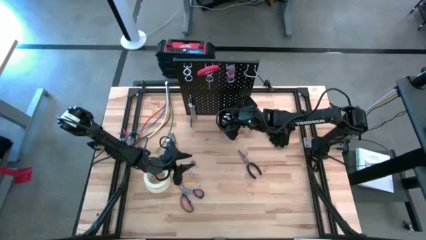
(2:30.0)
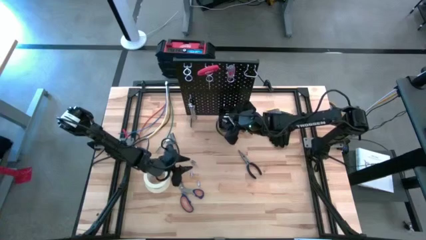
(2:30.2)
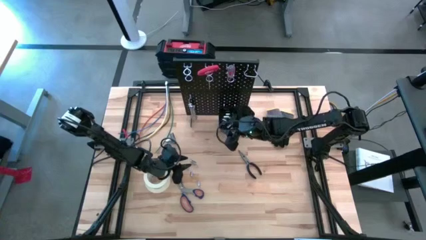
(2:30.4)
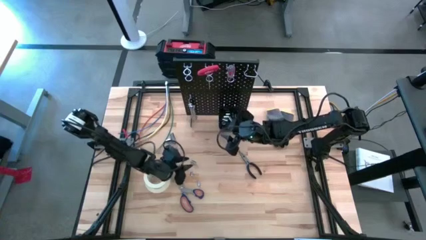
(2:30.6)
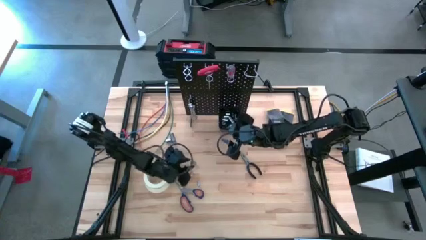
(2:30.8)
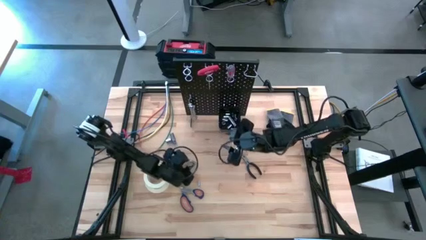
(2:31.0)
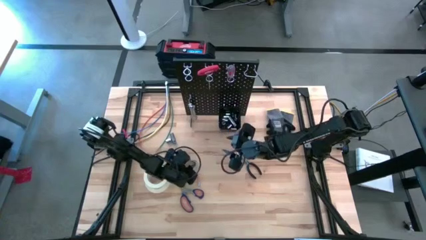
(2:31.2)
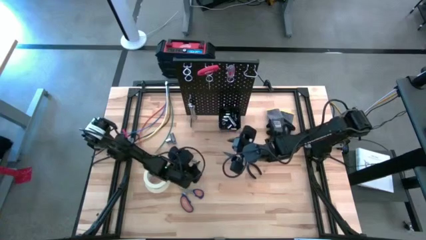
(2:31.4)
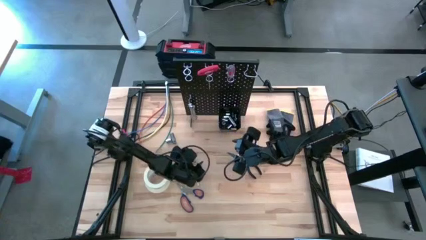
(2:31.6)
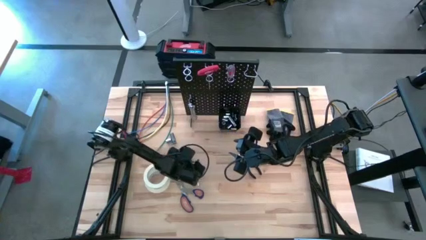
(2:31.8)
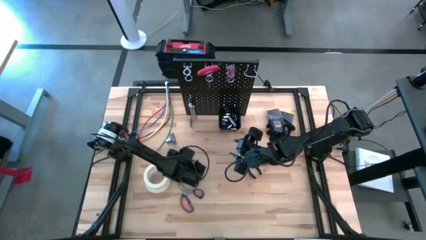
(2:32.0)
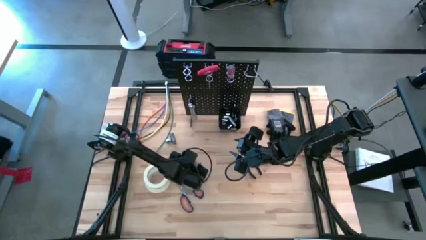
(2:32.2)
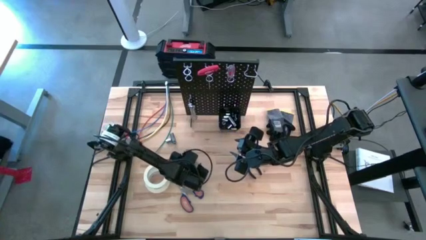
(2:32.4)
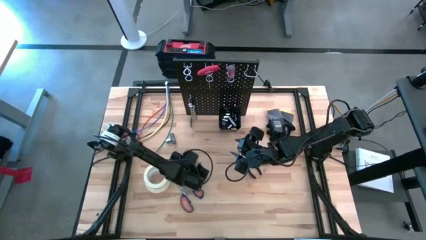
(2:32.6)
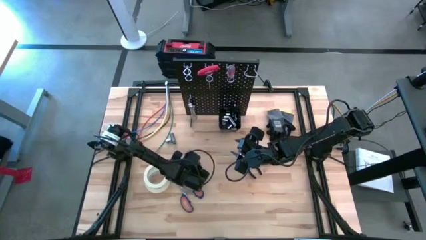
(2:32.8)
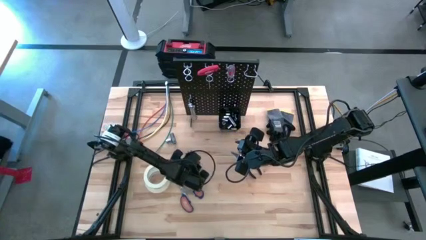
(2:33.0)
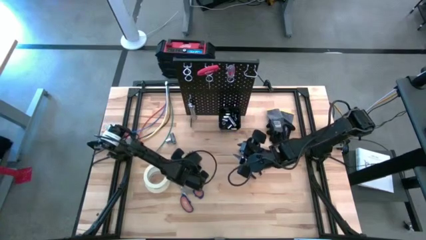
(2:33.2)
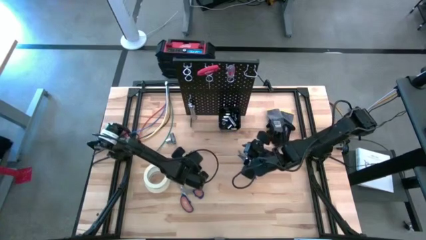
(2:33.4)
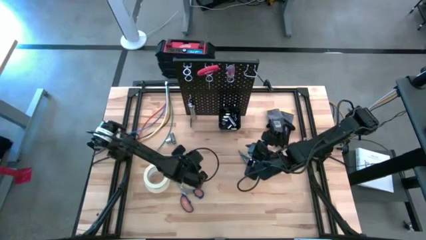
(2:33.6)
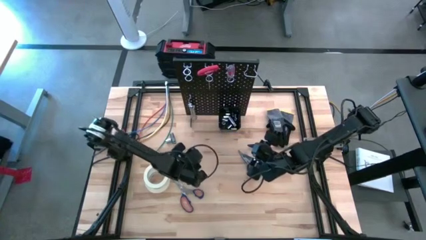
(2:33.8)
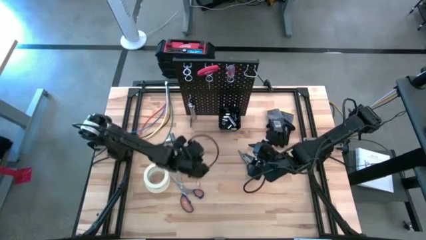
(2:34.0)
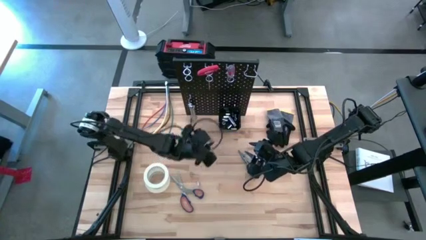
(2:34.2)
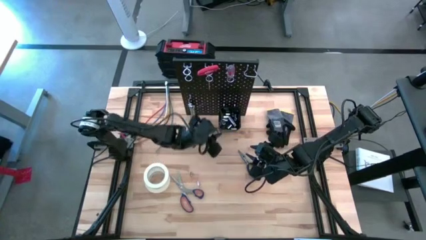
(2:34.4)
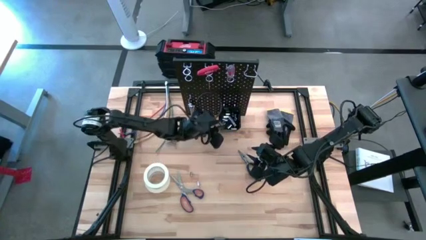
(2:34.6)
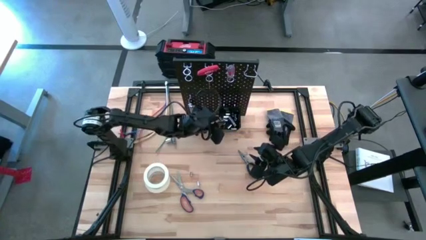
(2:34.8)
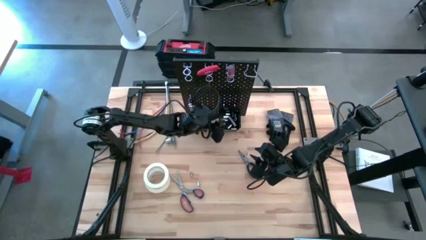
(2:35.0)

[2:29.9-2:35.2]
Task: Hang tools onto peg board
Put the socket into the black bin on the peg board

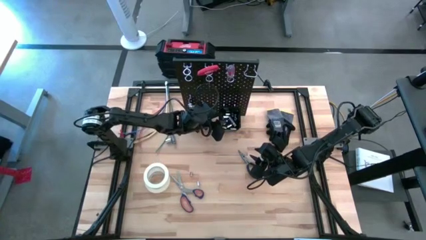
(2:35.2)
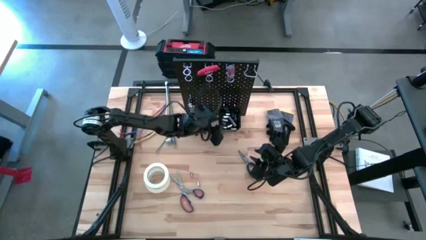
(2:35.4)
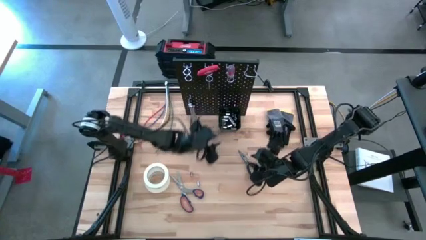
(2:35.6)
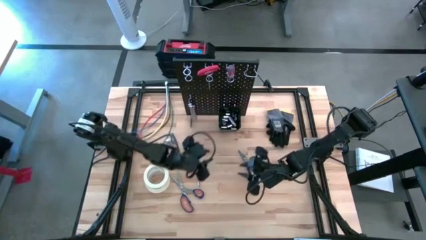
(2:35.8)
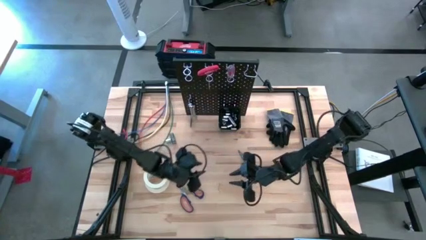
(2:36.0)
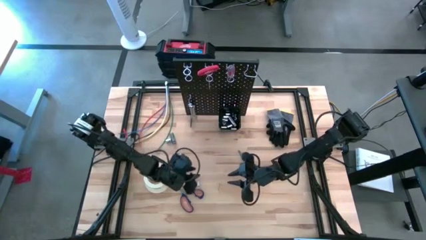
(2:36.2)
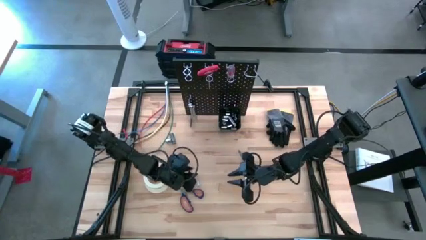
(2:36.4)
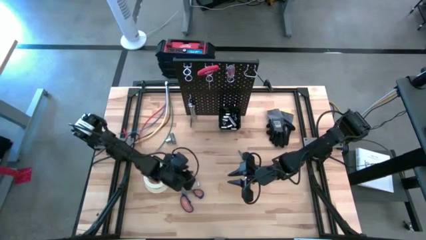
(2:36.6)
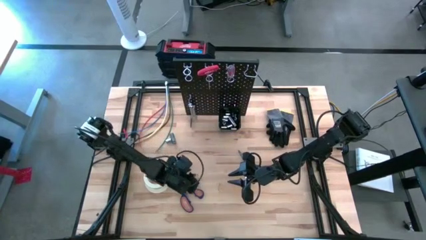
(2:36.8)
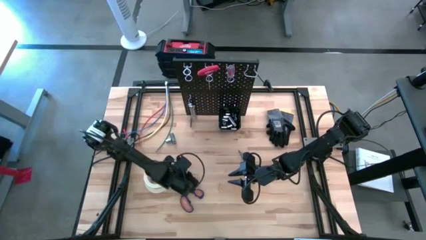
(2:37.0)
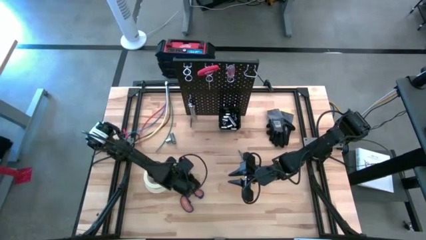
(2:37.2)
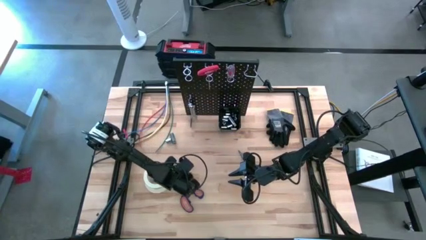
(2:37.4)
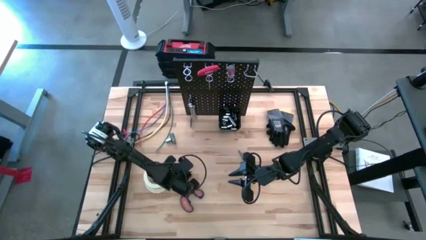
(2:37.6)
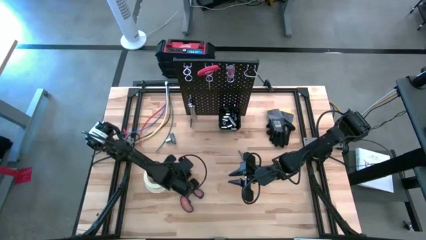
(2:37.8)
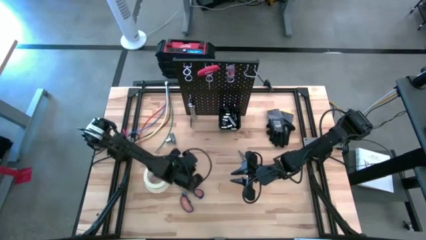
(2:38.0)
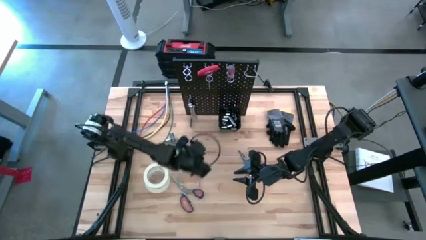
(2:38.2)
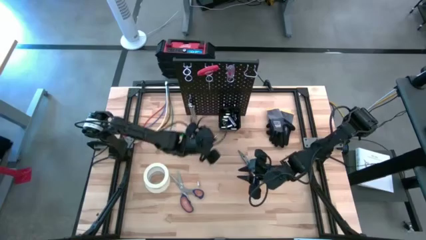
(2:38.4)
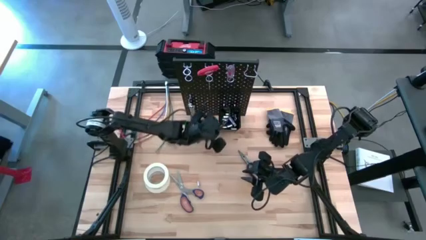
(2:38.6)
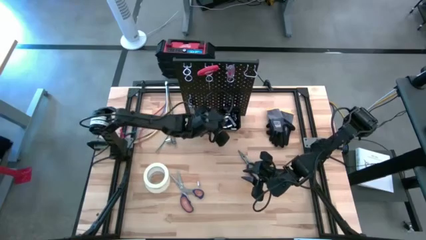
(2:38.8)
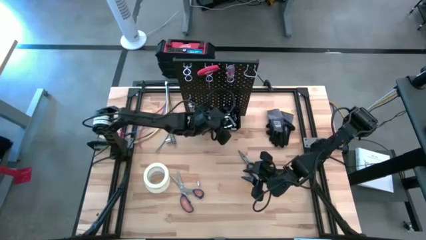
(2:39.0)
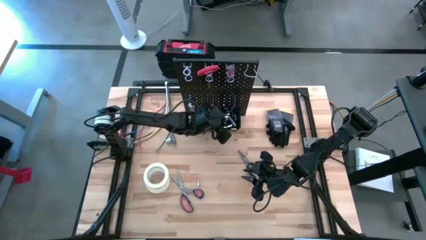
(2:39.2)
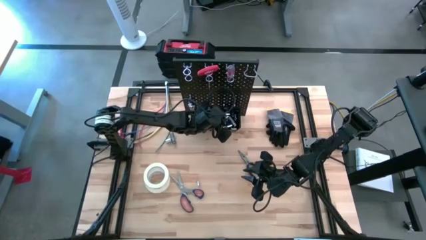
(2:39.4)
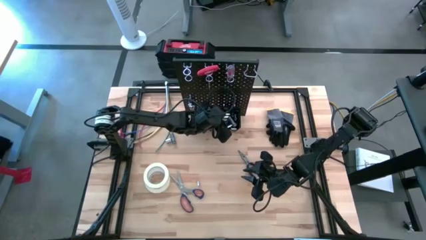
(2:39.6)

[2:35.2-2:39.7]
Put the socket into the black bin on the peg board

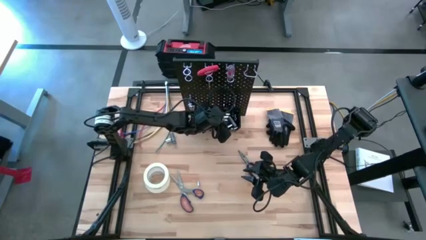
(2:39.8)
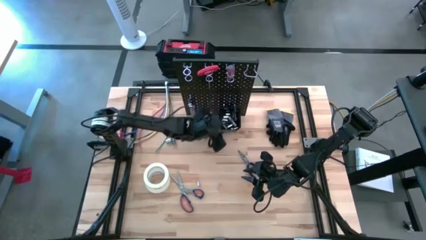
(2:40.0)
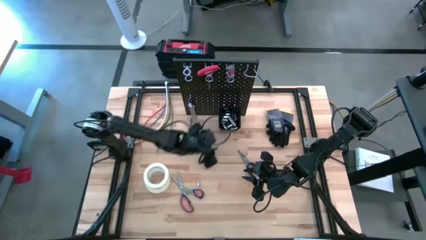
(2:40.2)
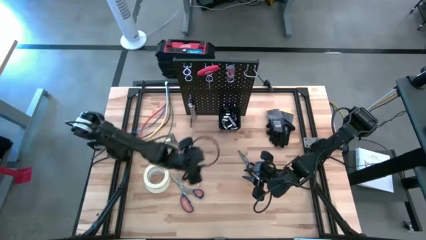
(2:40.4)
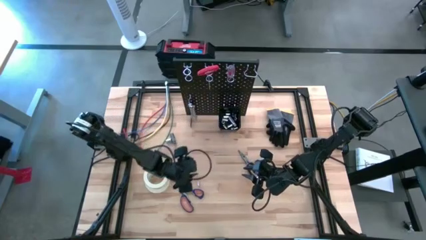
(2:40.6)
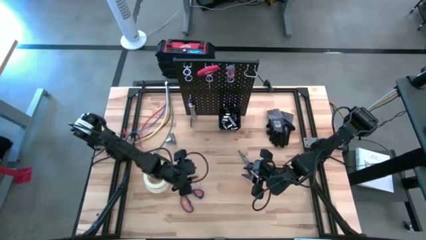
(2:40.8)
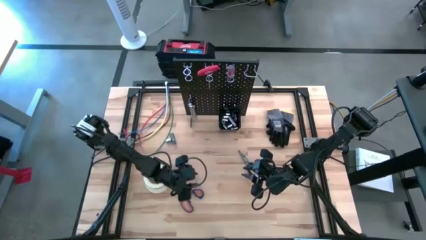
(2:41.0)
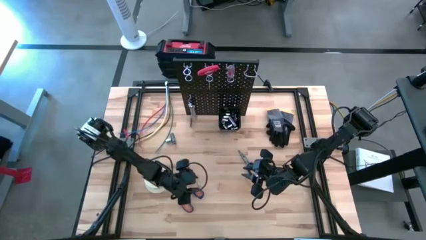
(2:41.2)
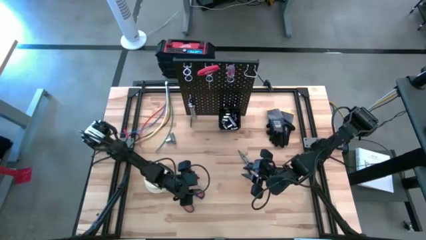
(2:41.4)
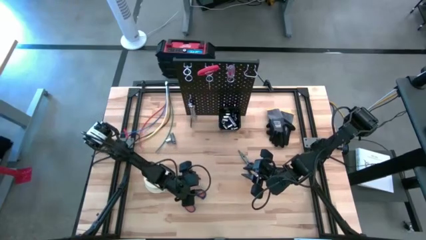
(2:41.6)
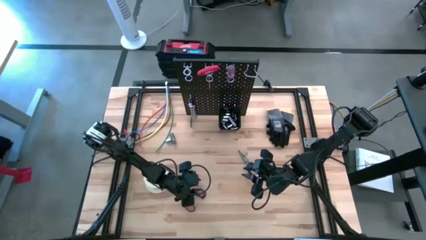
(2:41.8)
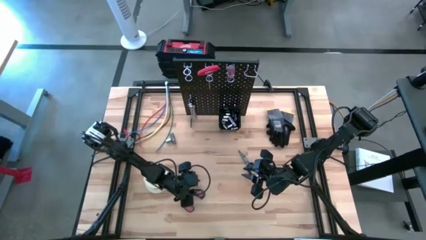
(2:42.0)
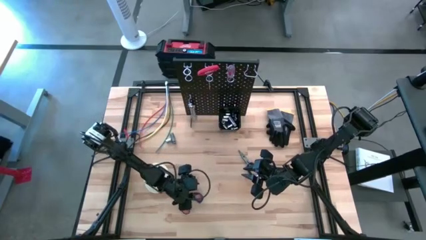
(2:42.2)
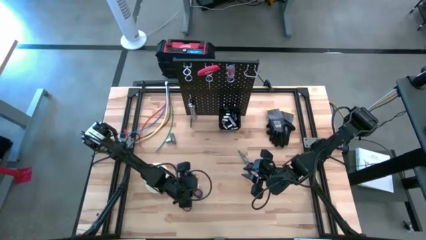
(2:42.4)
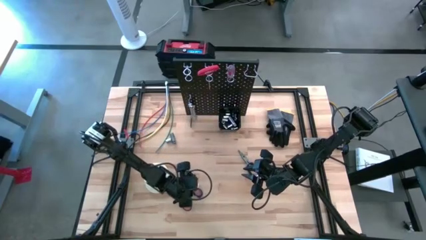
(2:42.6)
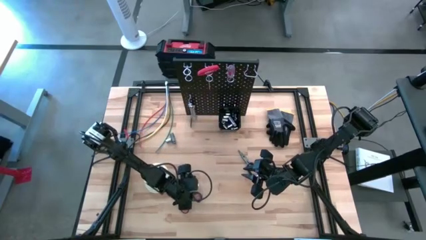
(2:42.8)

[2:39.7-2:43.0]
Put the socket into the black bin on the peg board

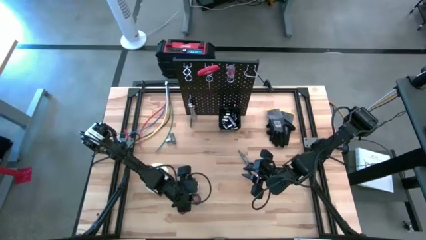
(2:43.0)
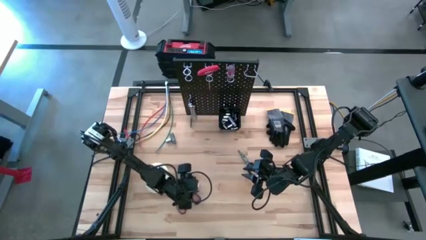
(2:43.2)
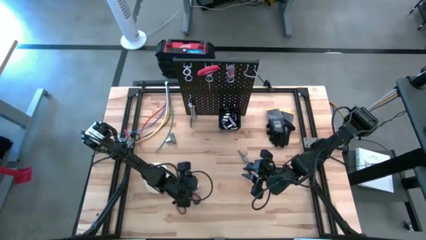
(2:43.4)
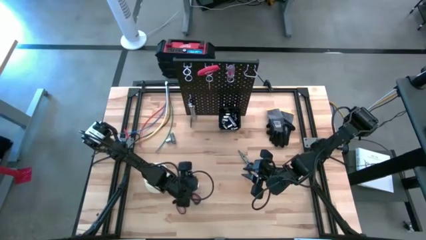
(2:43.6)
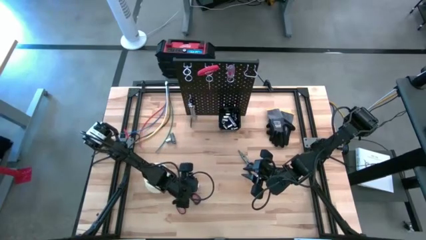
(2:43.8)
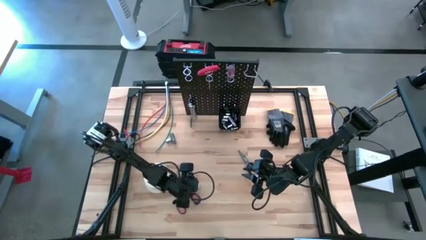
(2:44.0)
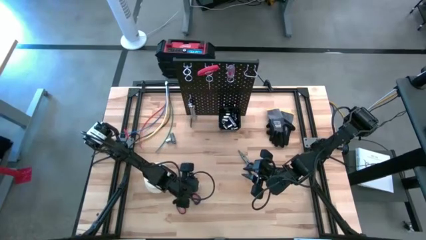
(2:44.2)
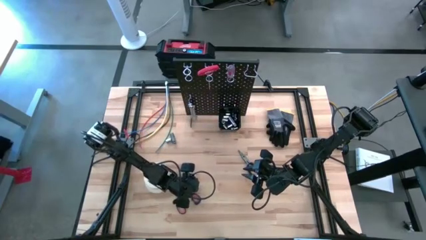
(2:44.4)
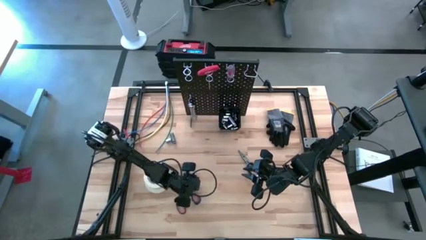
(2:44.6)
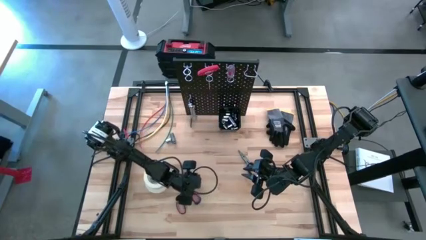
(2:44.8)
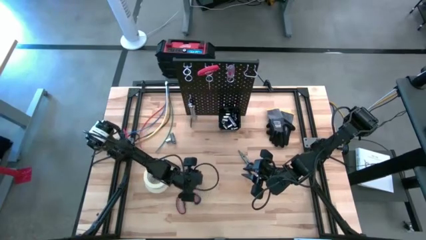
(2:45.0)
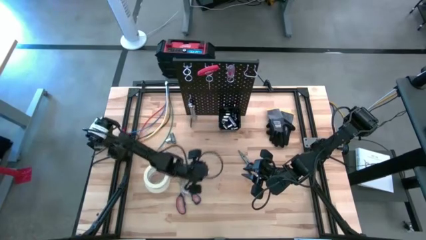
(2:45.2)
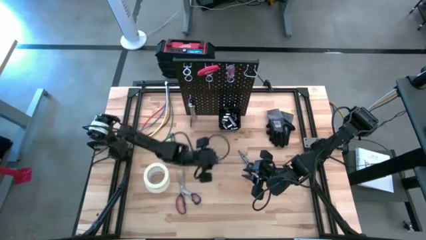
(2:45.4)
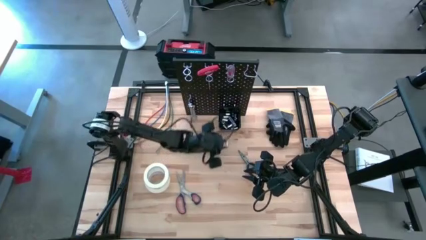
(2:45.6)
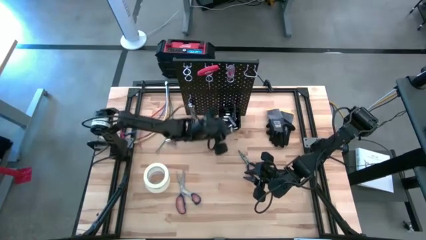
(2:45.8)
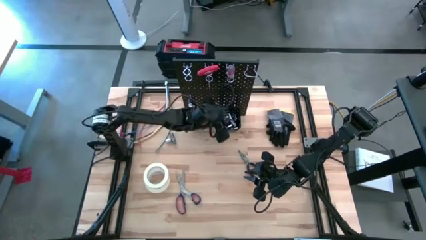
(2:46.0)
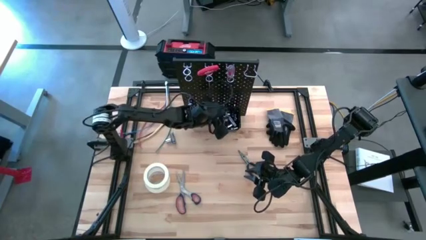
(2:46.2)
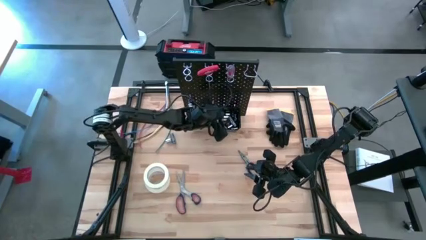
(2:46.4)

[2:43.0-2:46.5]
Put the socket into the black bin on the peg board
